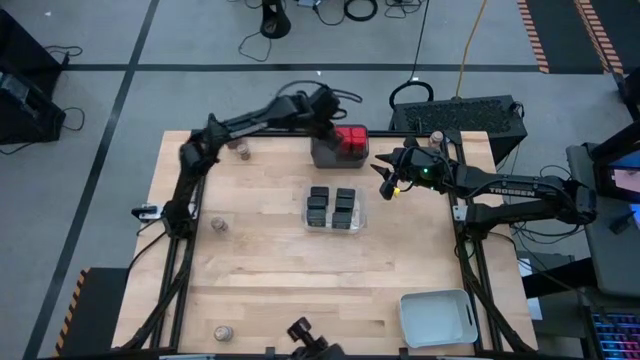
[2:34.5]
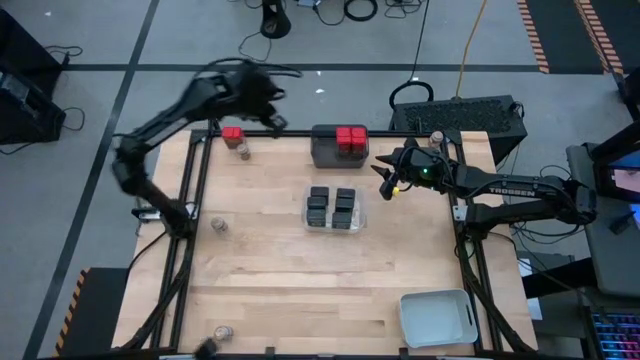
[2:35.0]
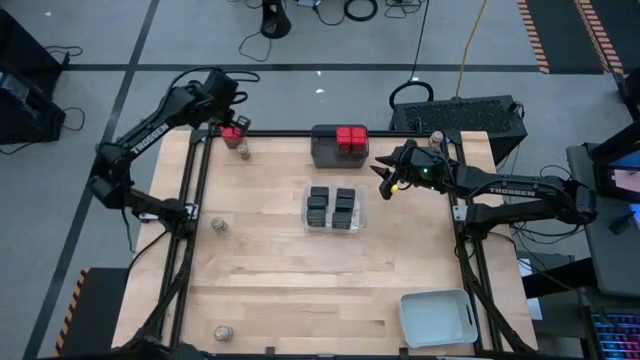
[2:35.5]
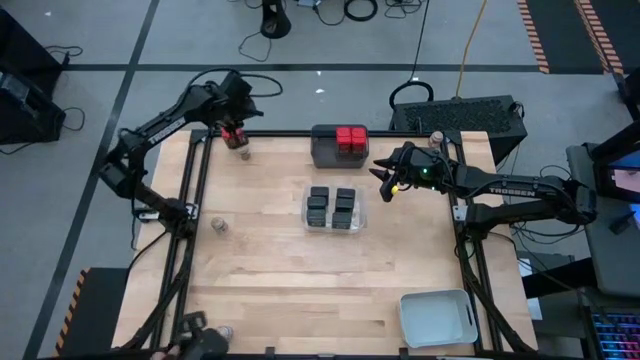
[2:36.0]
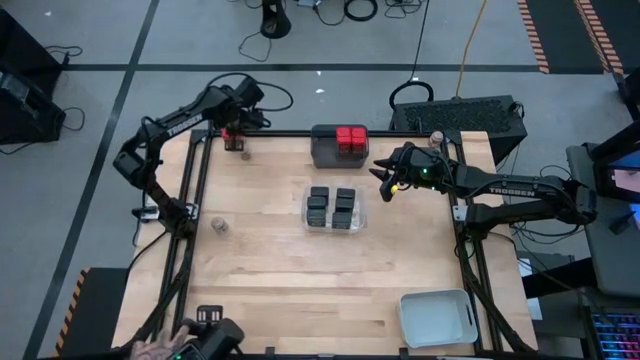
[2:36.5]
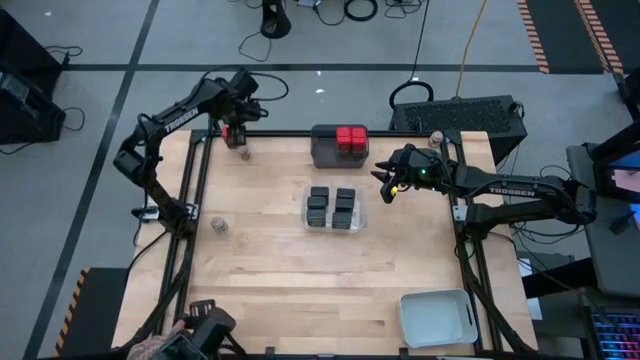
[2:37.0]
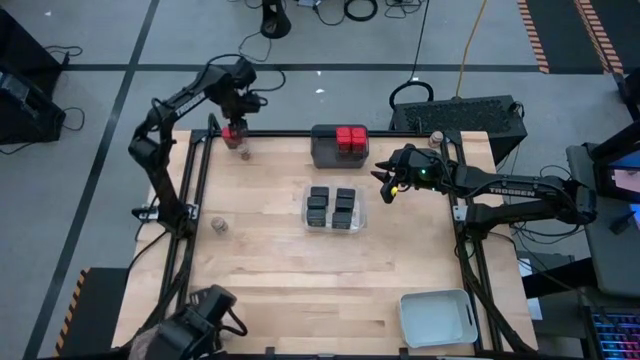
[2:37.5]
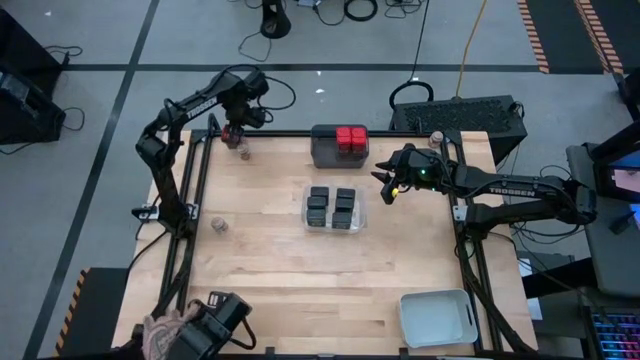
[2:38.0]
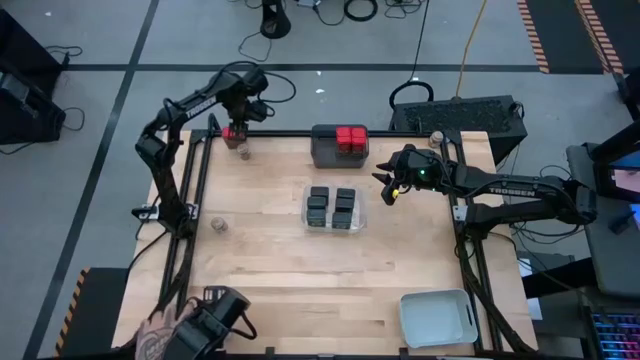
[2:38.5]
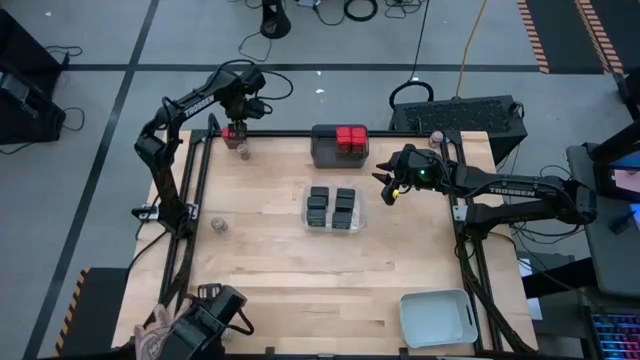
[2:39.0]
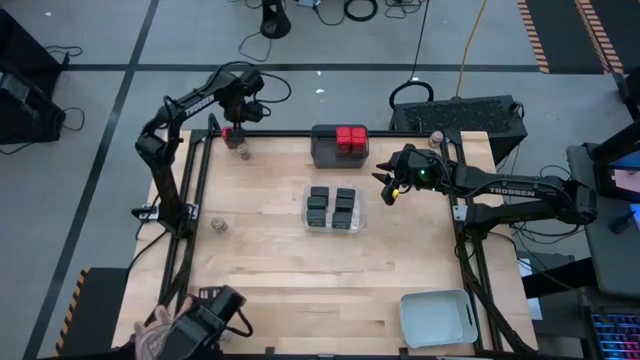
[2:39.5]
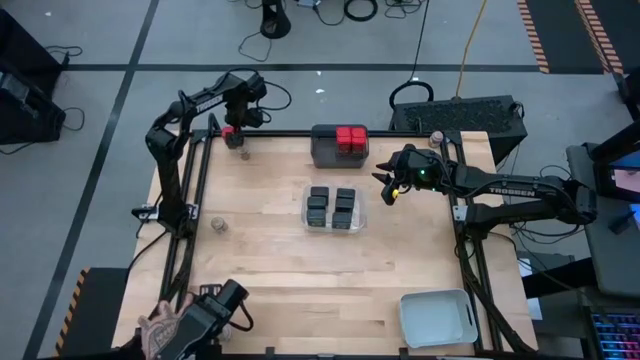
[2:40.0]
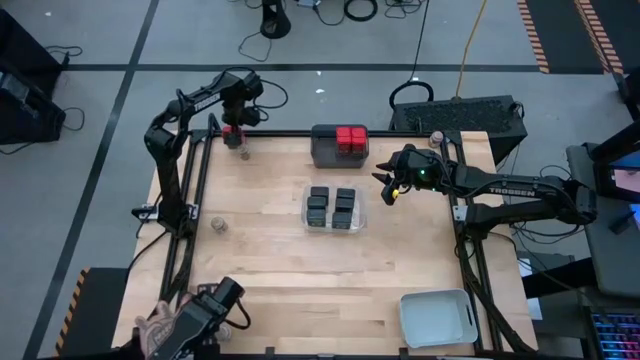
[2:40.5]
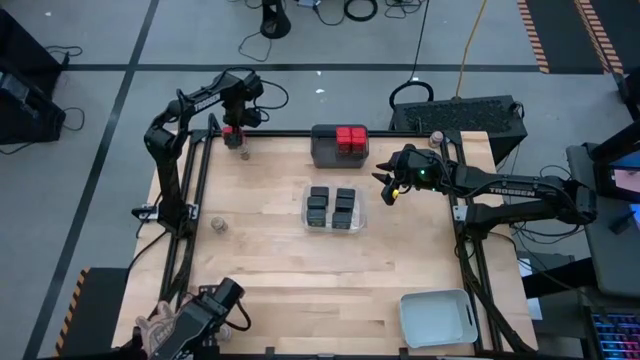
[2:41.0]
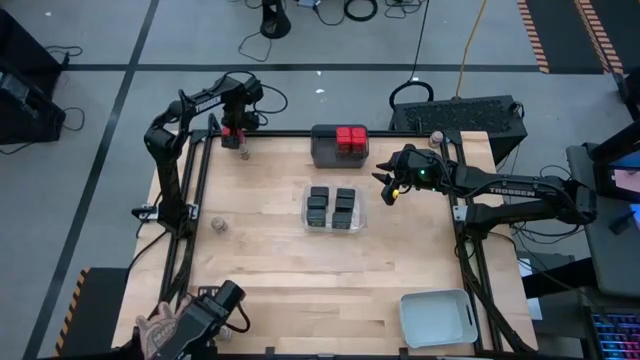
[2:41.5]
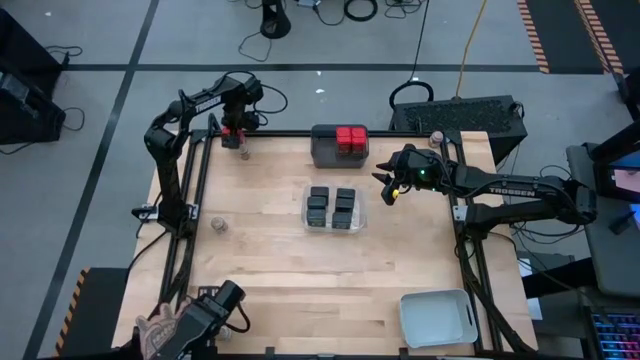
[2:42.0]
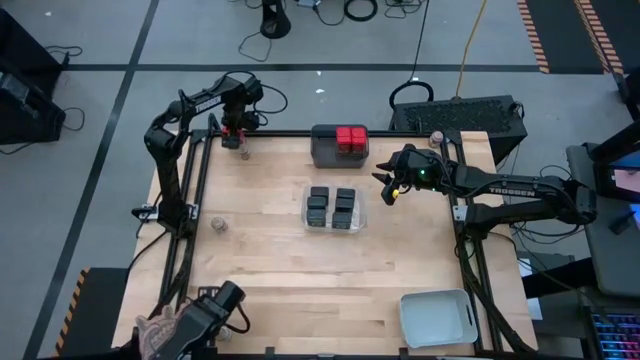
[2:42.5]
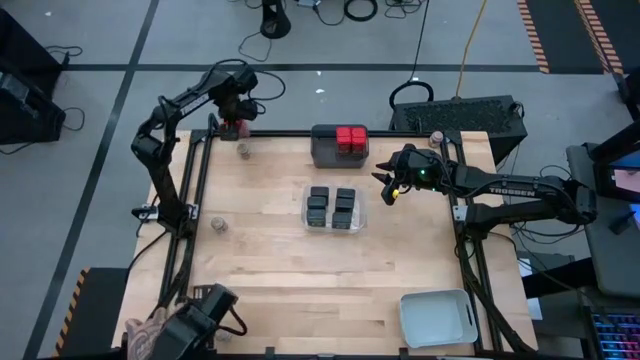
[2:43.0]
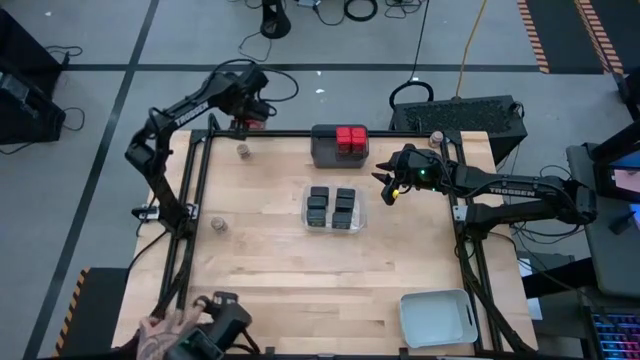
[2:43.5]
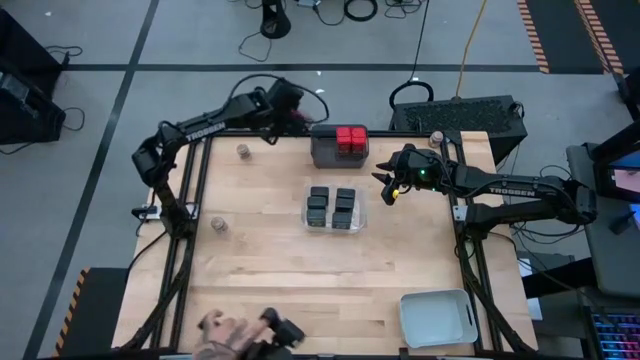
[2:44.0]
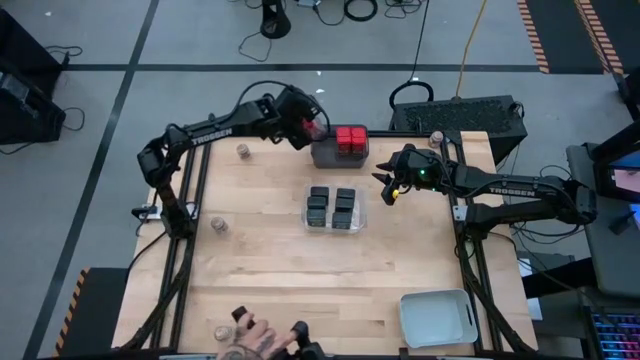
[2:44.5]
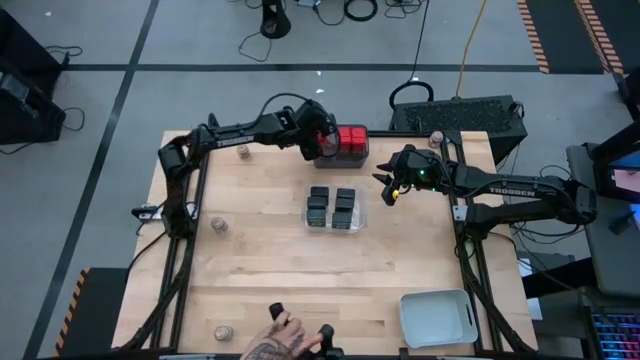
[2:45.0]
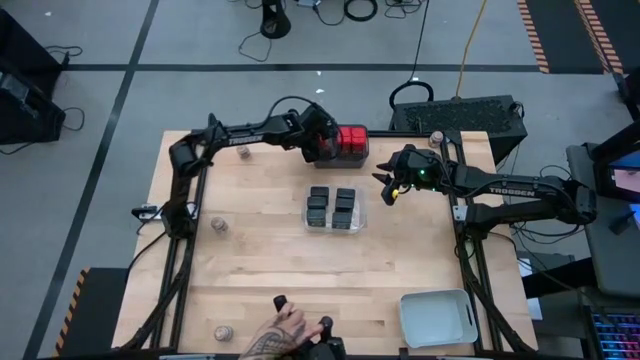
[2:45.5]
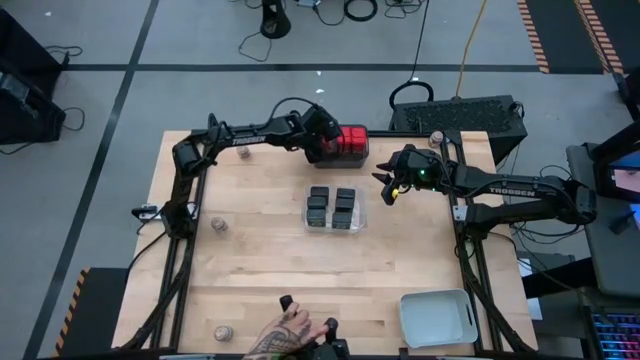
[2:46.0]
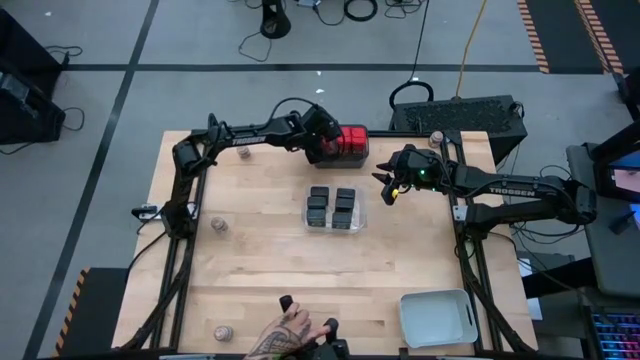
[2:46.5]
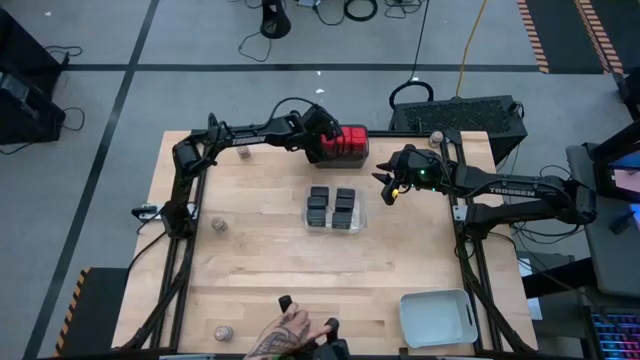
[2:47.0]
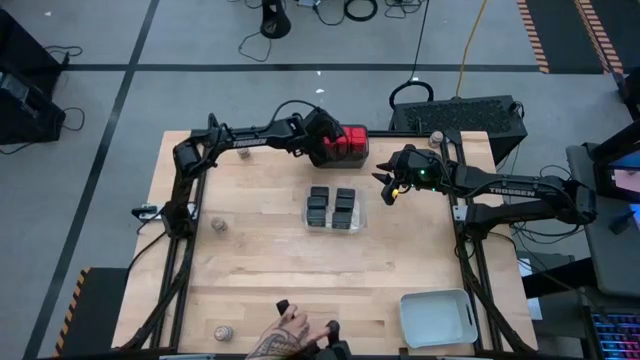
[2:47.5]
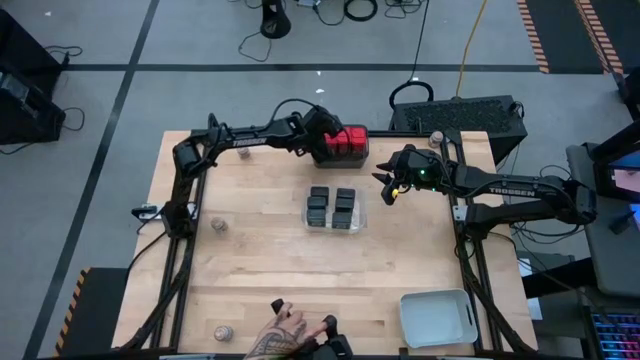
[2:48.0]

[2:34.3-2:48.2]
Task: Sort spices by type
Put the red seasoning into the gray bin

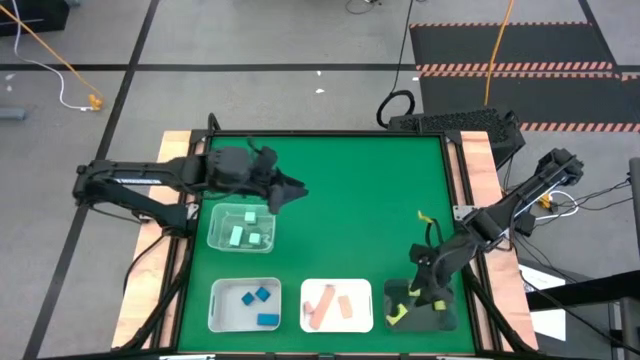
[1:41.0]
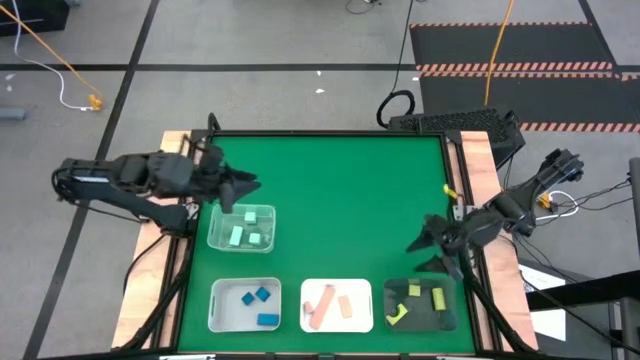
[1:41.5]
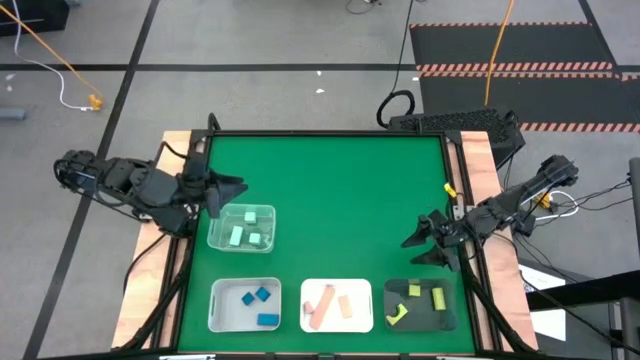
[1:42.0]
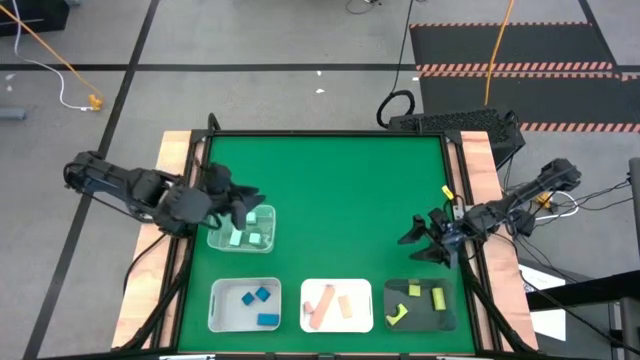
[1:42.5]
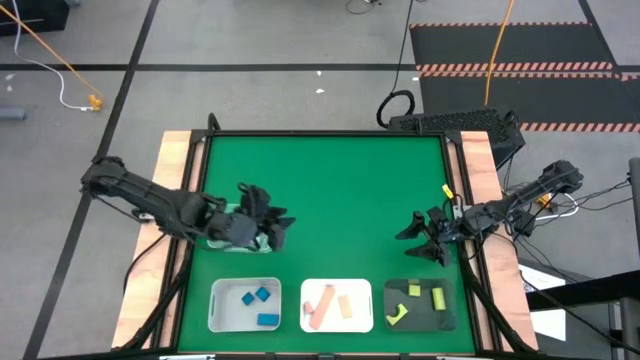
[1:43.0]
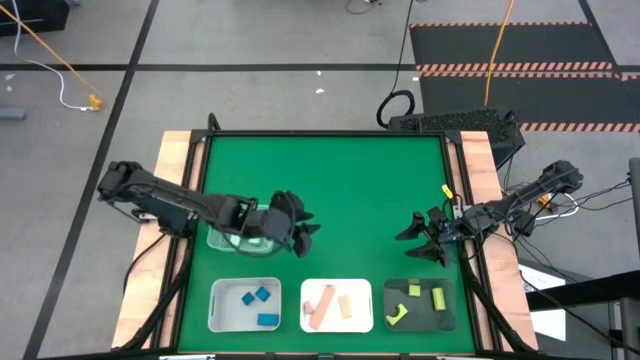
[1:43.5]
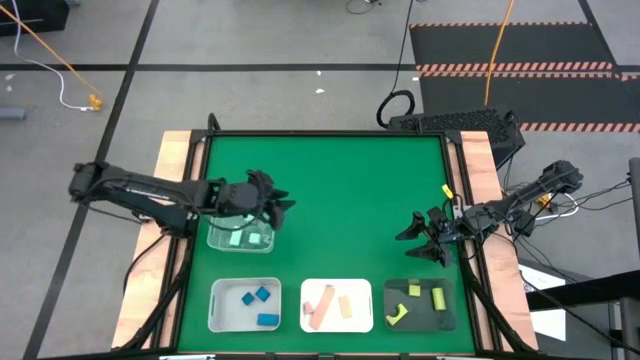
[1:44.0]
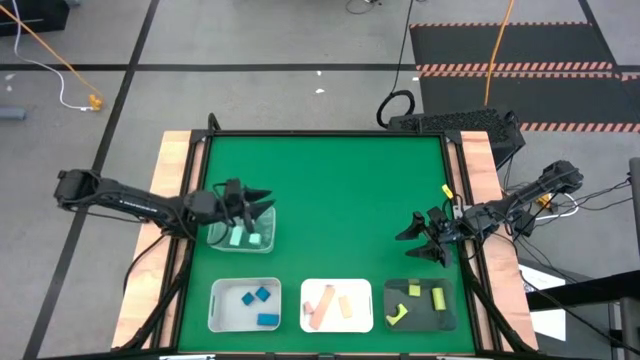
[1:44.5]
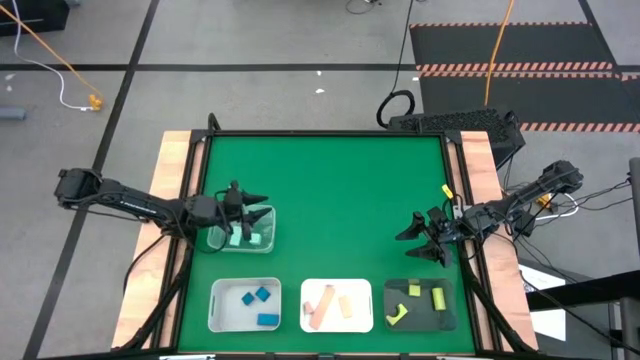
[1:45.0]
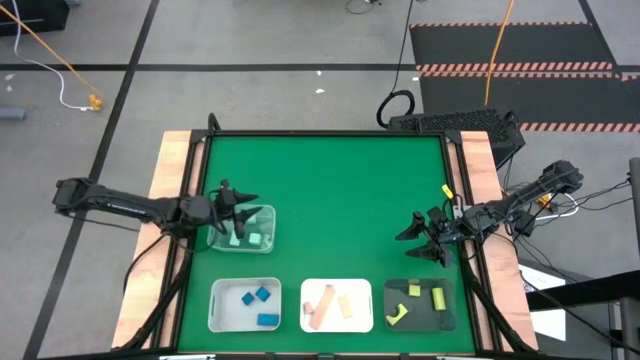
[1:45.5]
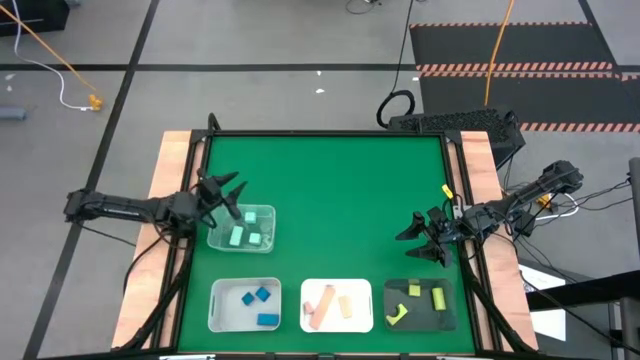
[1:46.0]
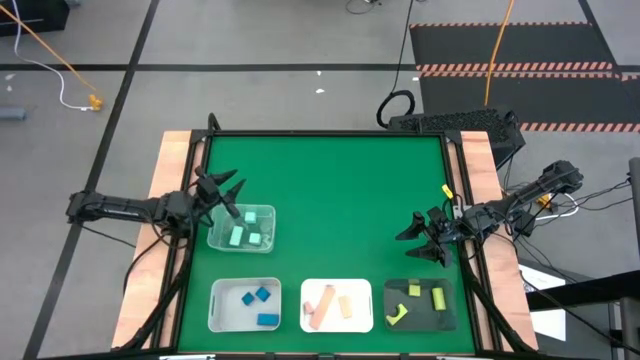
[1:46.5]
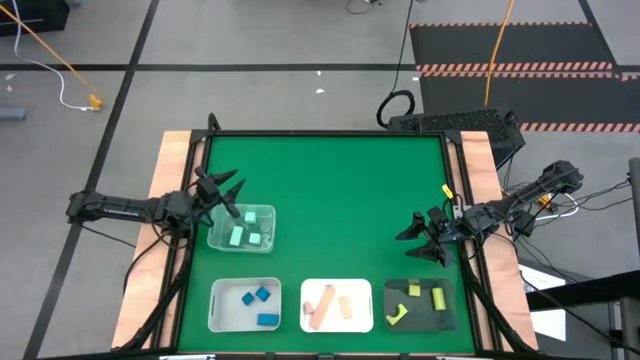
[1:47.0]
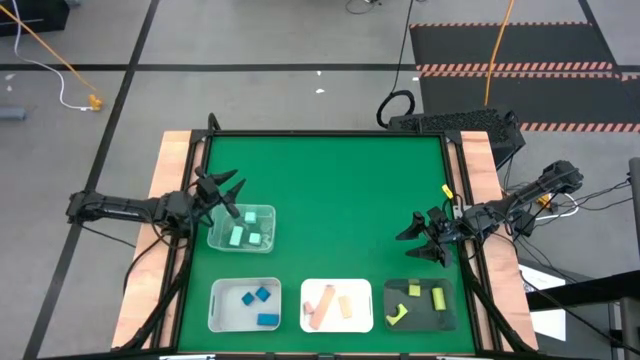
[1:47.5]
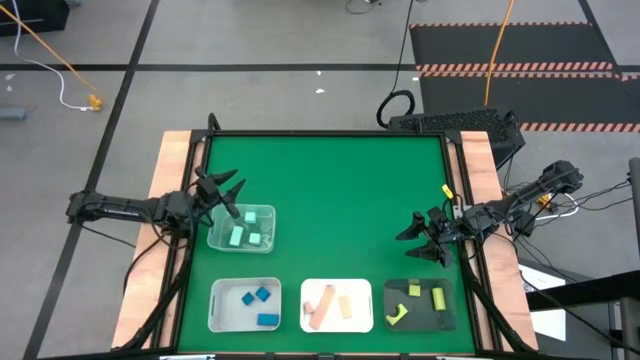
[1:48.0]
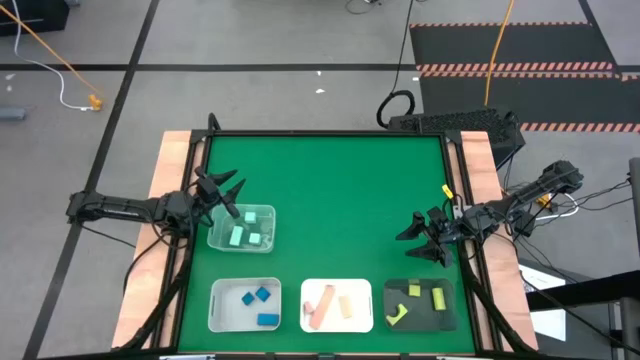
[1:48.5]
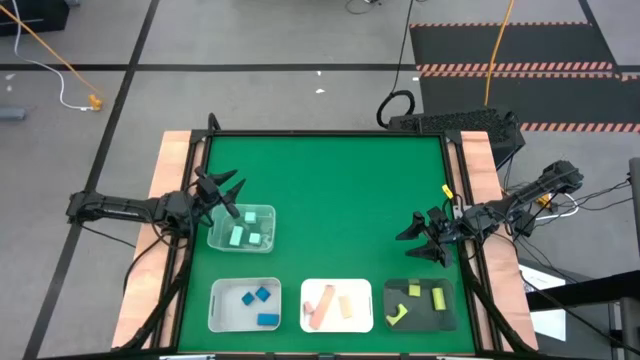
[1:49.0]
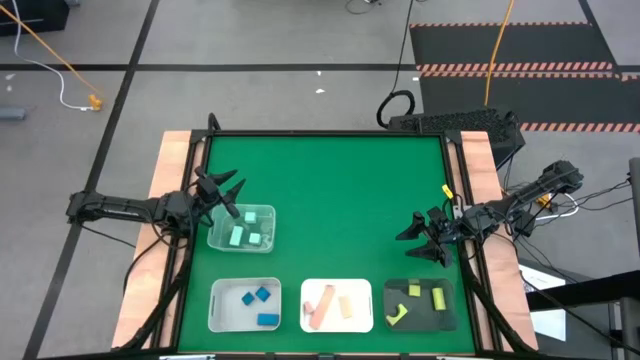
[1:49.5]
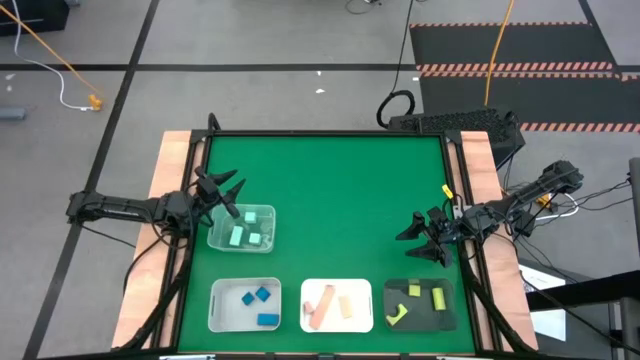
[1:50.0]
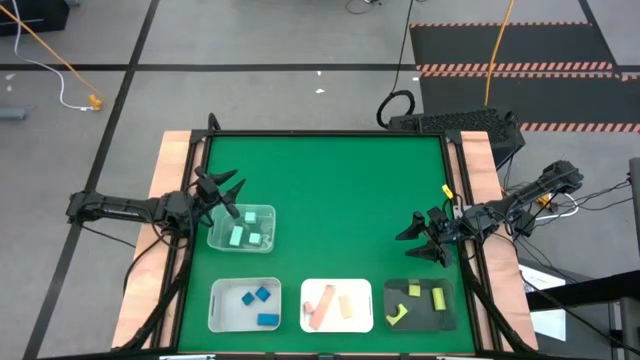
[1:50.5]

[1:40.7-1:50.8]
Task: Sort & place blocks by color
Return to Home Position
